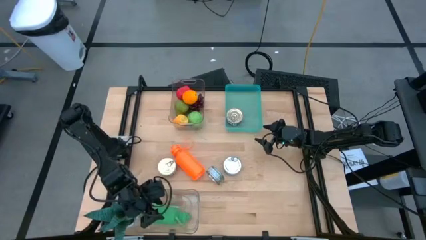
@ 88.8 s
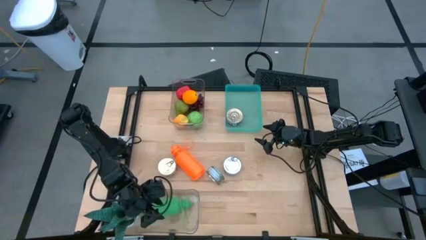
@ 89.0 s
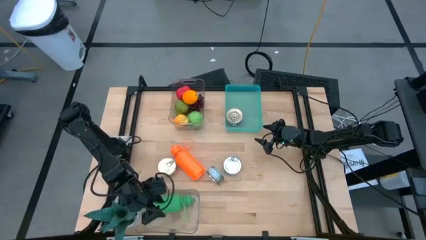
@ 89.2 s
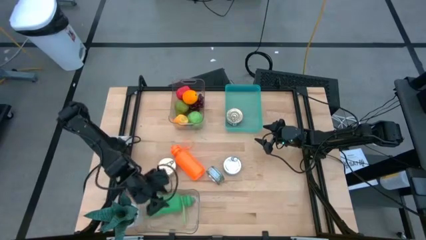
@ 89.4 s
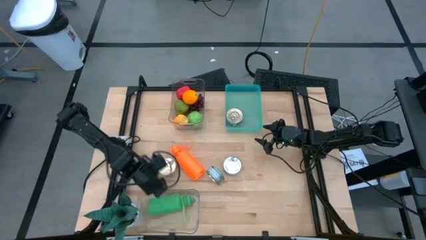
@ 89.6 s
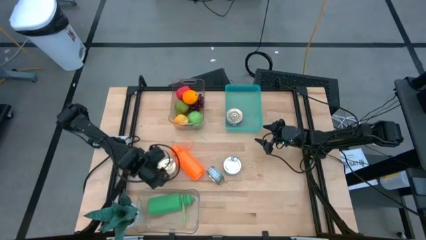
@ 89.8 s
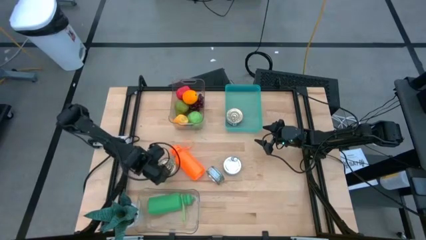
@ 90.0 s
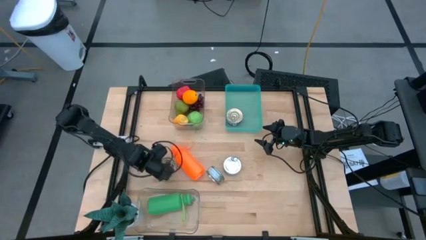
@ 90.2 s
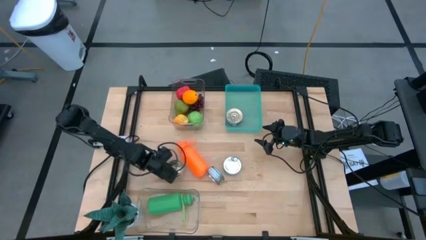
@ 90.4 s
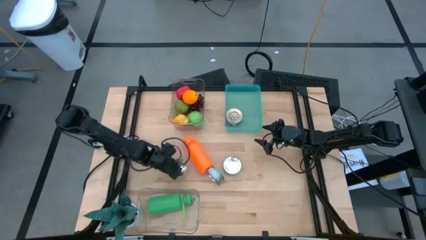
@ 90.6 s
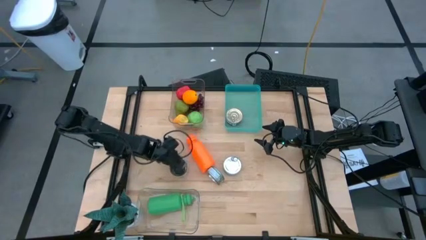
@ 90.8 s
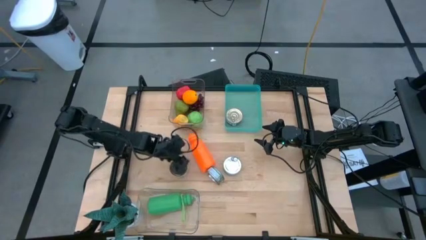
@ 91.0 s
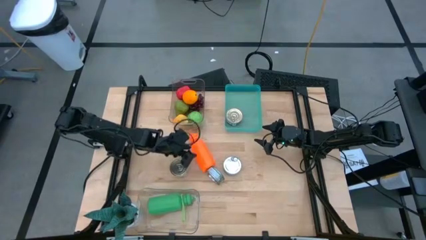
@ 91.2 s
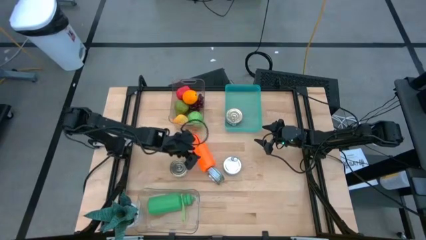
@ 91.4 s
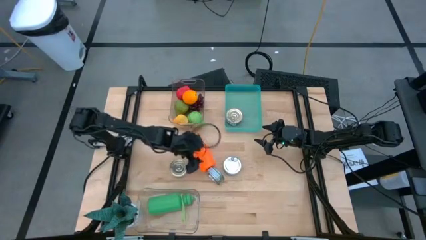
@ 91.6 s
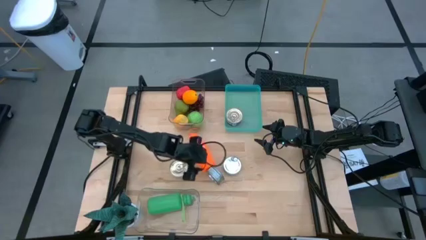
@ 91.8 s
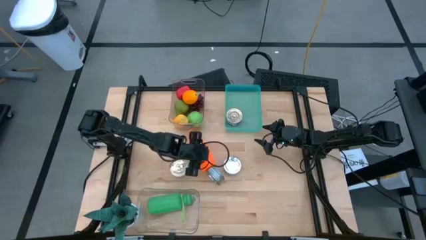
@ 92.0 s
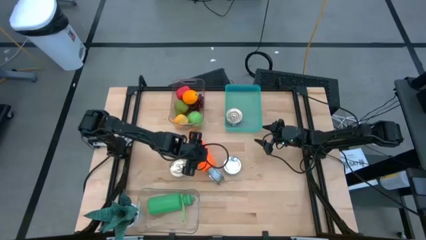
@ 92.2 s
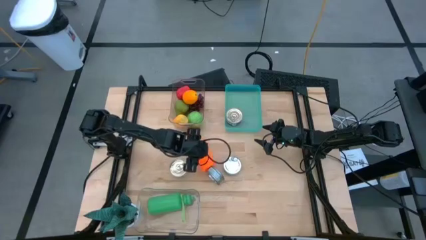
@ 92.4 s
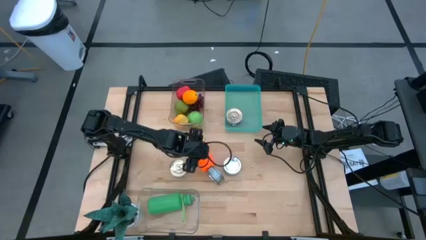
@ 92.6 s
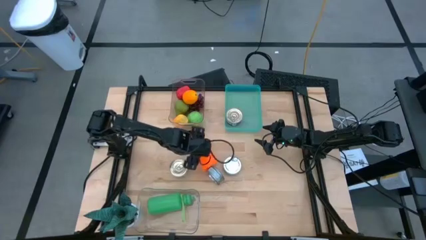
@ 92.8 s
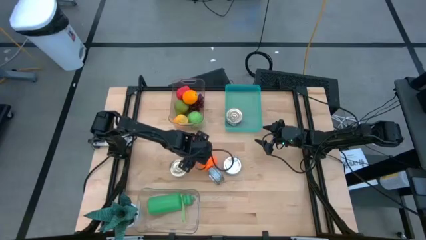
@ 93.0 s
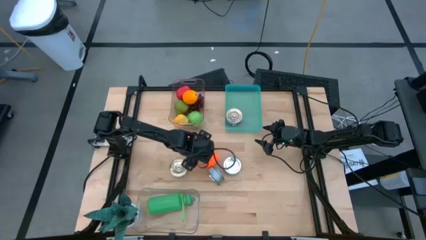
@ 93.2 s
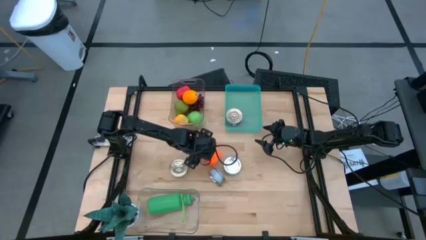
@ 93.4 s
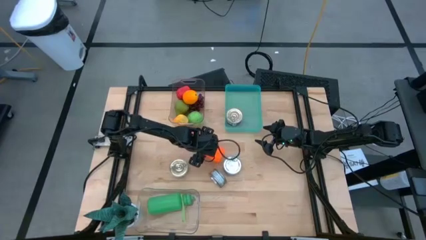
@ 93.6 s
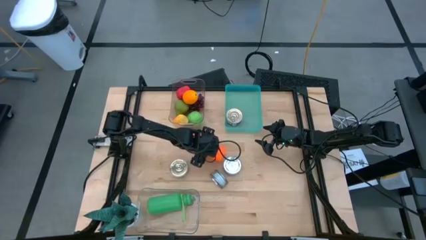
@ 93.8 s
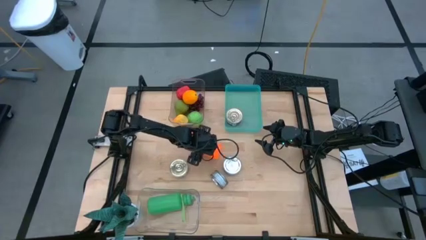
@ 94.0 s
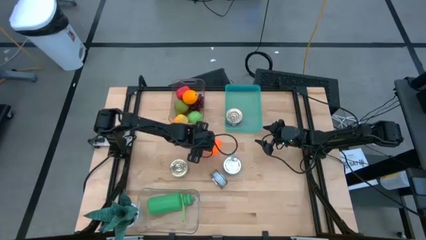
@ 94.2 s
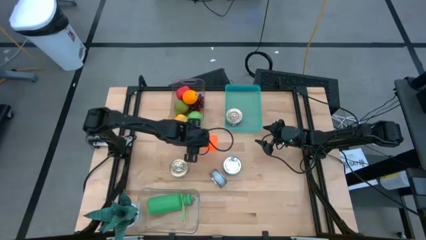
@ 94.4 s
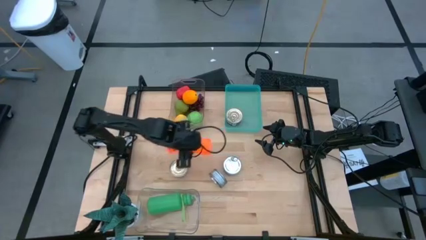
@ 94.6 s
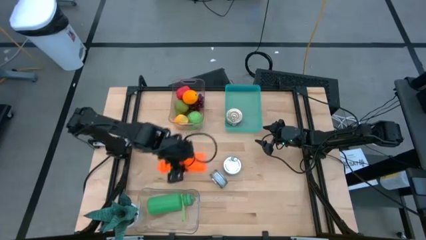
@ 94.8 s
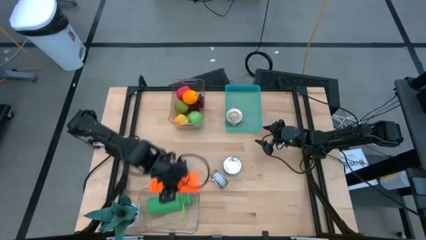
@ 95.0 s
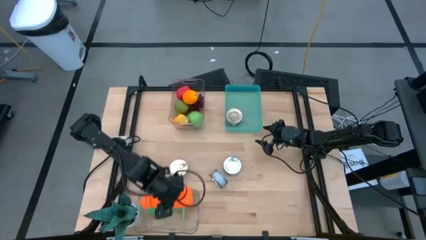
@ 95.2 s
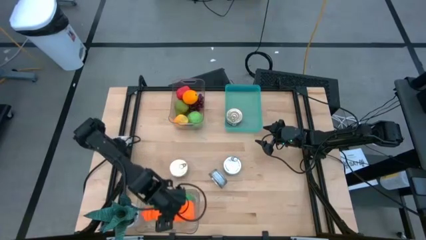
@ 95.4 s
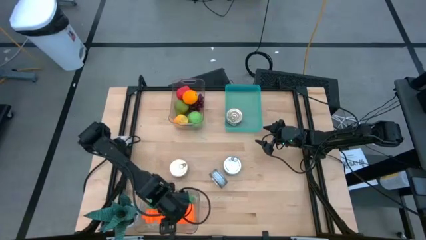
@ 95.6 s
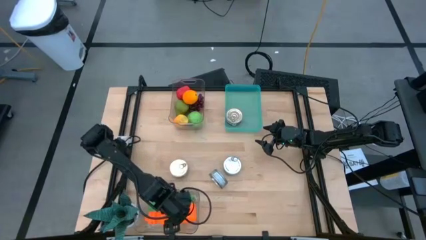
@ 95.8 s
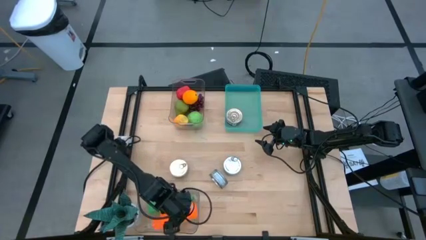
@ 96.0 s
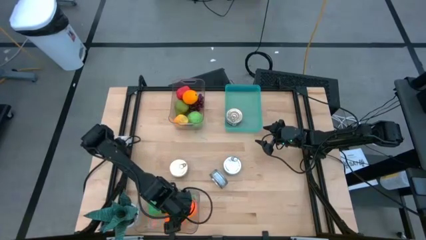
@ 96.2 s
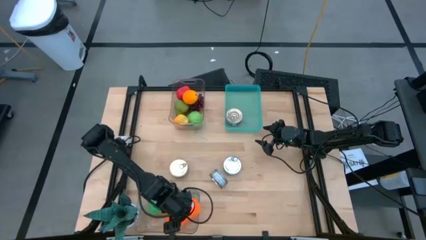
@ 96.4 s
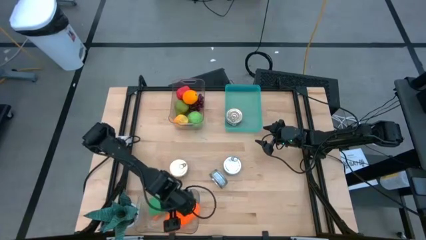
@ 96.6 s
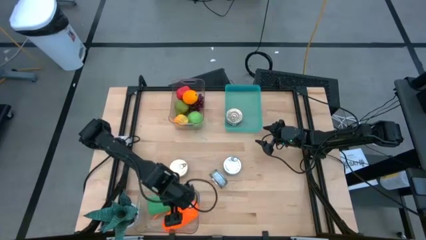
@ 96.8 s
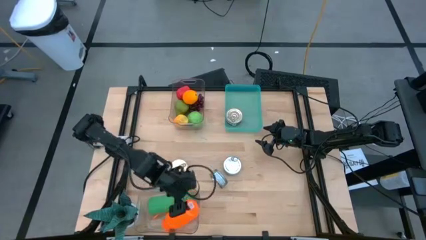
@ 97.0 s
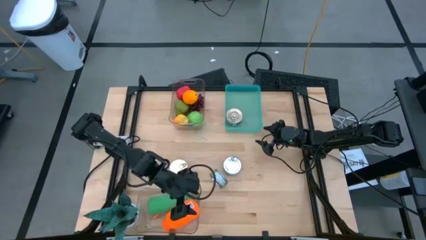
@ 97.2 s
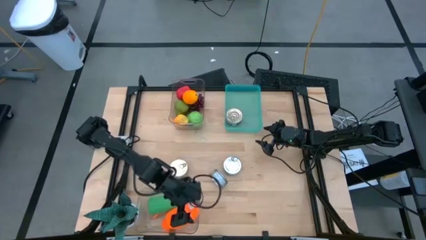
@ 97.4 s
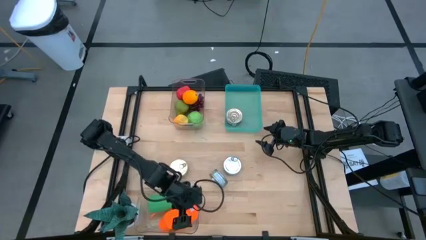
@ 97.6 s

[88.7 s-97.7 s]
Task: Pick & Place Food Item
Put the orange tumbler into the bottom transparent bin

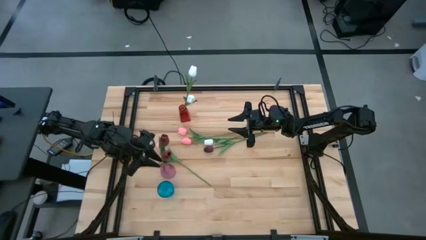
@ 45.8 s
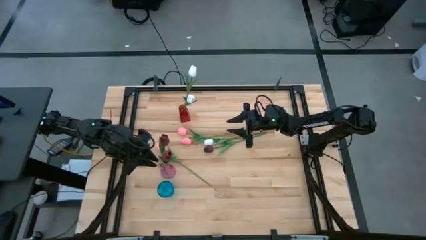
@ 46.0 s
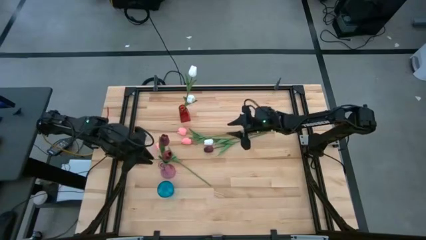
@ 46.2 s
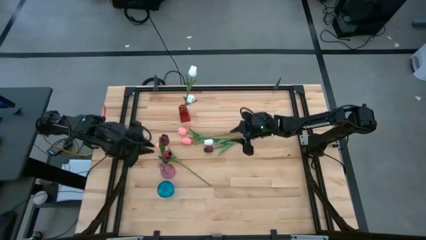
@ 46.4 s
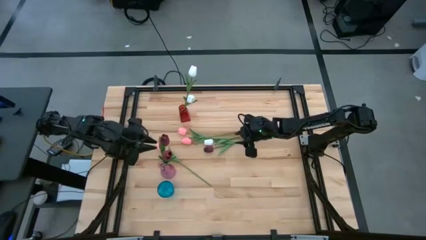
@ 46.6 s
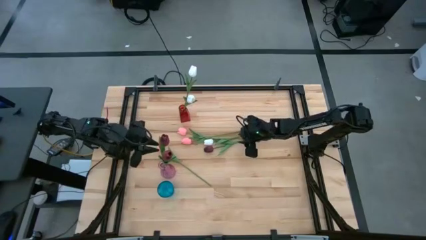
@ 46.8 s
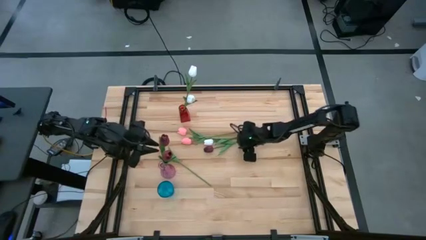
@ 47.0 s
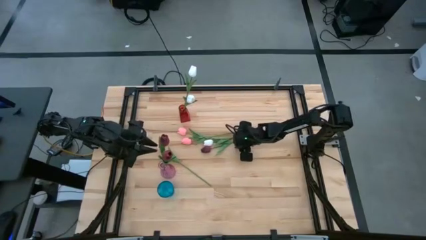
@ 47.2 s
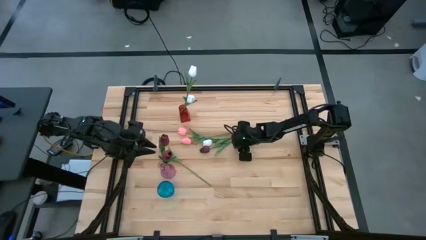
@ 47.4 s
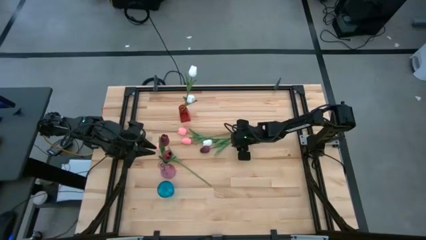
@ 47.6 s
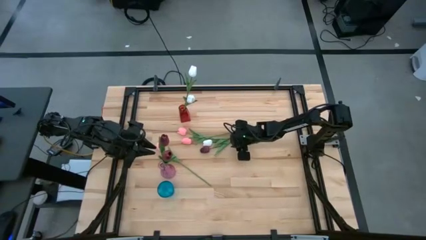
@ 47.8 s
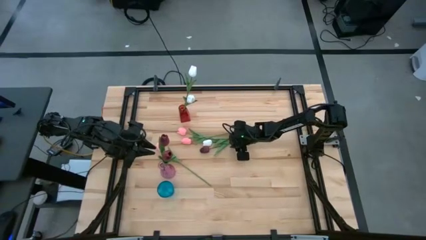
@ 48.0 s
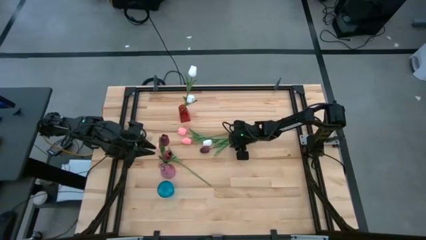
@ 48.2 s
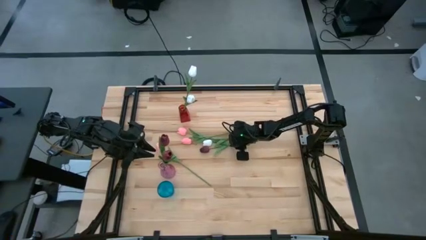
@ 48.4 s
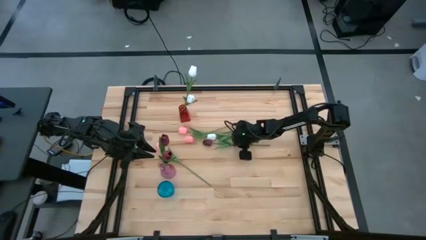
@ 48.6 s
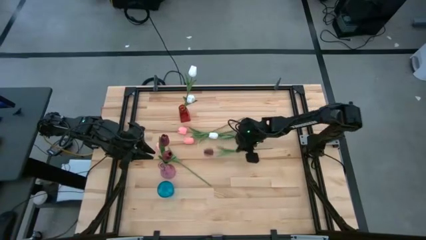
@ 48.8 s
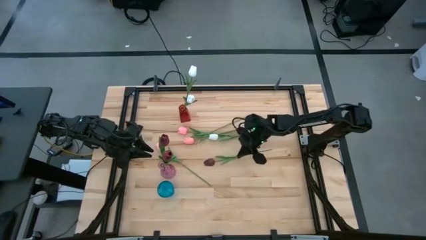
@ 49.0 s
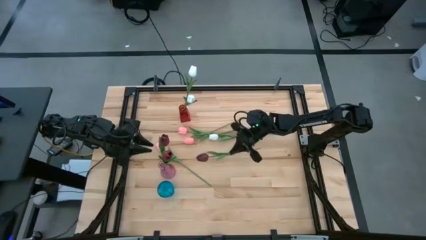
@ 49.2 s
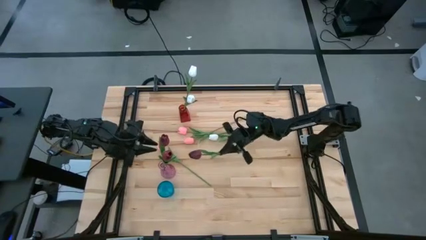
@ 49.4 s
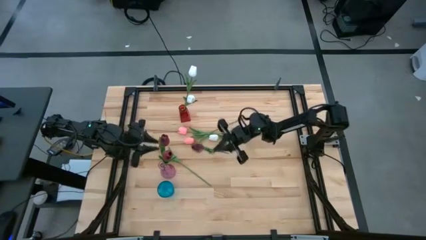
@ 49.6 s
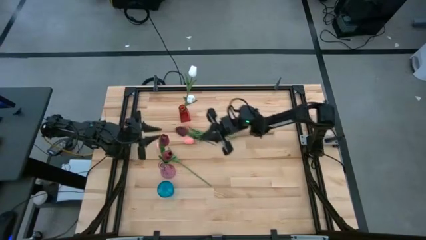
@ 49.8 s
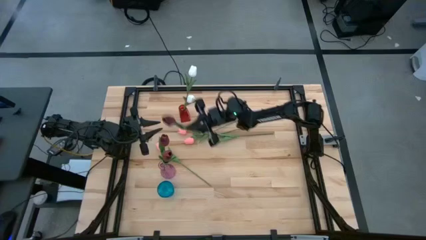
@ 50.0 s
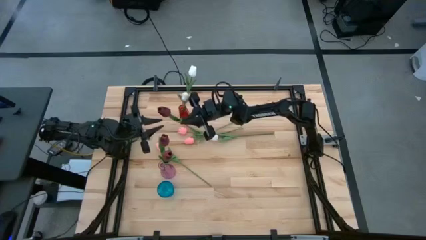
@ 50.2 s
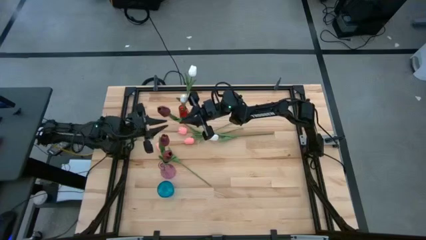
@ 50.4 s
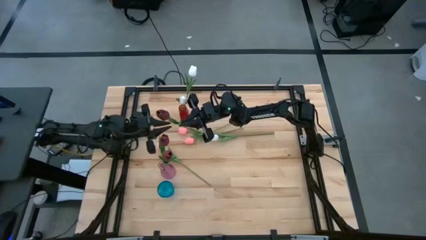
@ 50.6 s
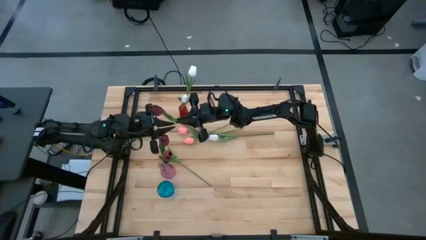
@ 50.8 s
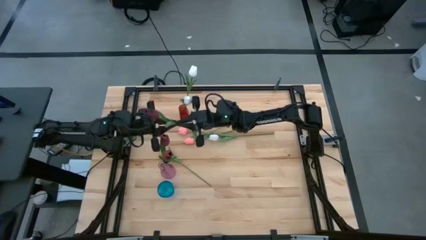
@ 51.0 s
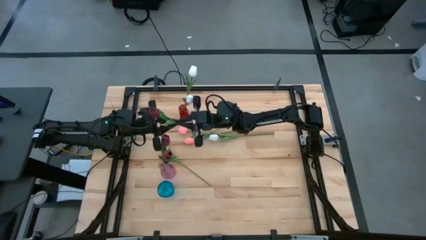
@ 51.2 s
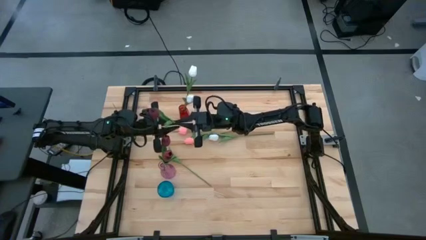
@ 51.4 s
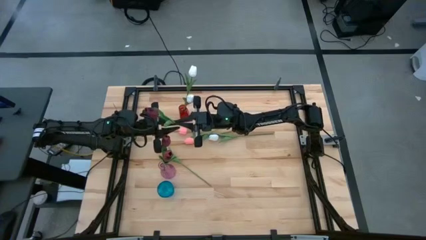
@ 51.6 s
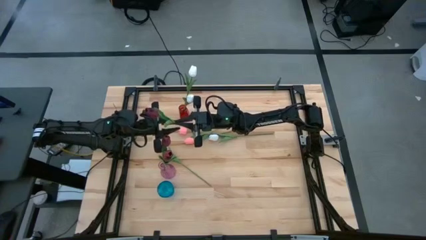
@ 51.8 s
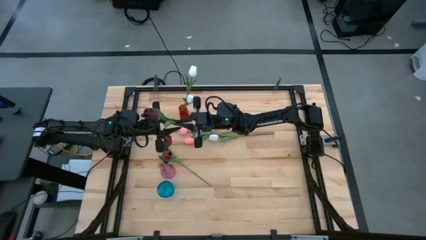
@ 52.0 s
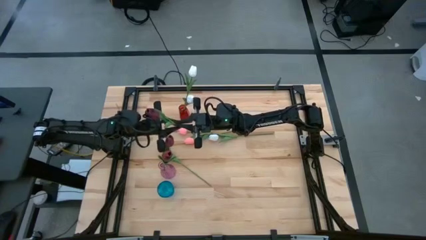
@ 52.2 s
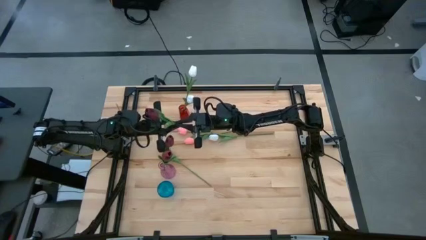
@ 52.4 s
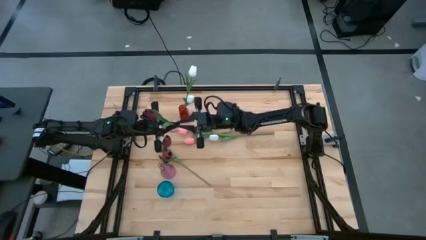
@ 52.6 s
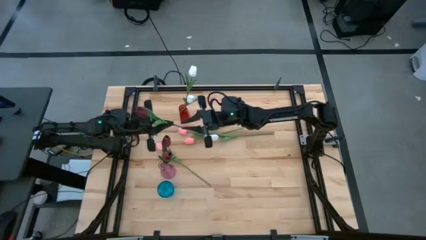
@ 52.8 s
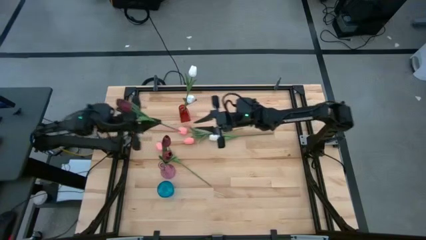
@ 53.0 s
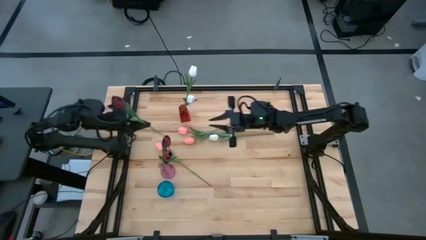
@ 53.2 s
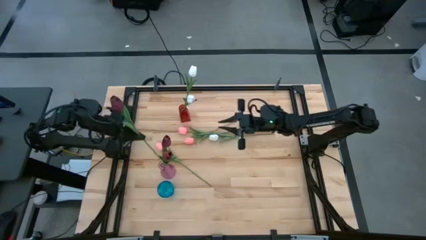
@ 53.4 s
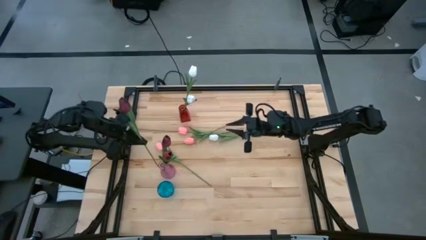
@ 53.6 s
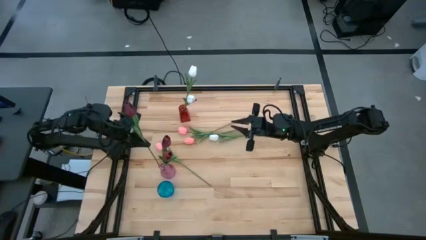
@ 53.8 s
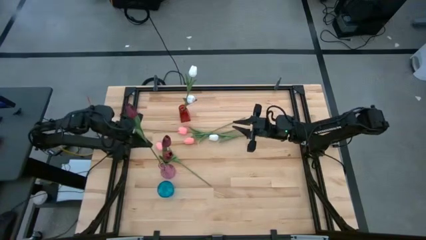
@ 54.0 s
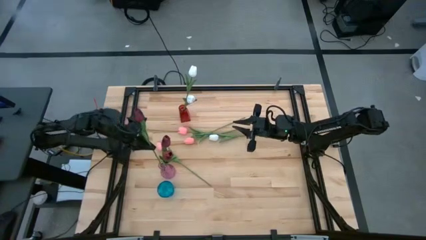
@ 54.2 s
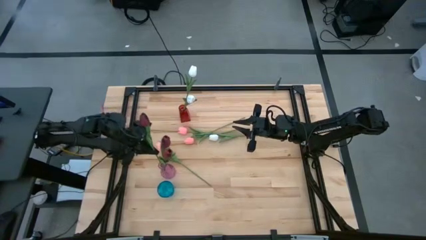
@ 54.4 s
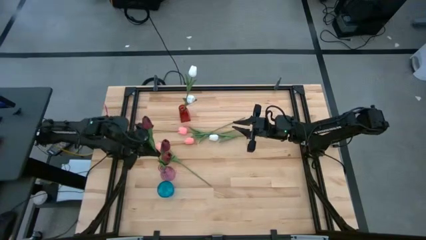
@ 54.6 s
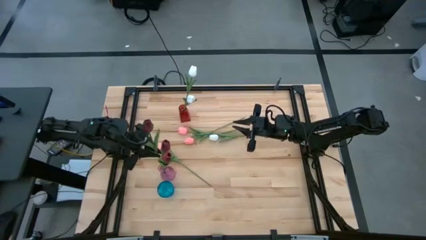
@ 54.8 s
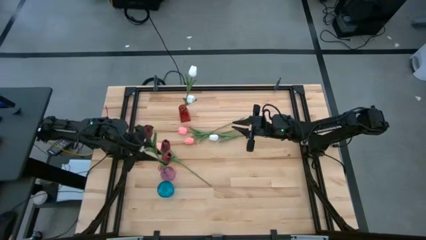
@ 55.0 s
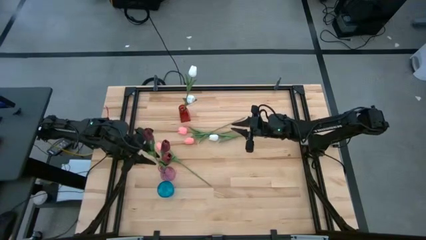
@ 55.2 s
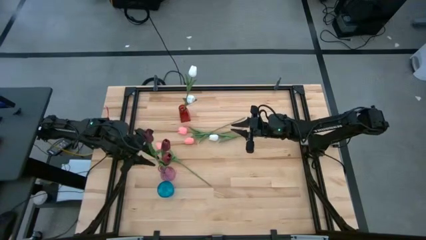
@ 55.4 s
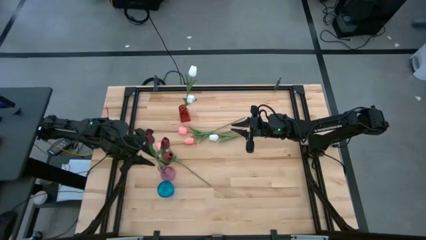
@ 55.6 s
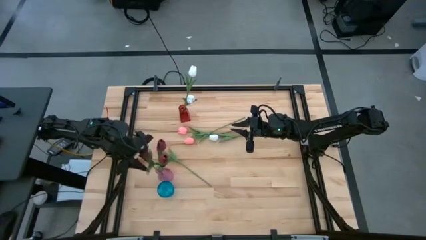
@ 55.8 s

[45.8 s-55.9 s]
Task: Sort flowers into vase by color
Put the dark red tulip into the pink vase
